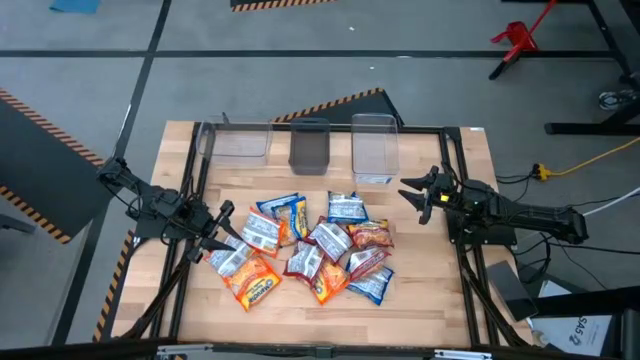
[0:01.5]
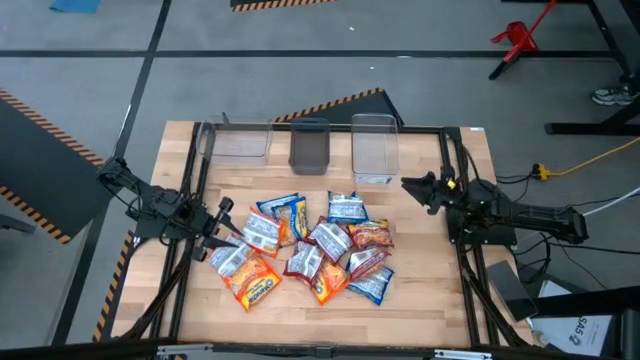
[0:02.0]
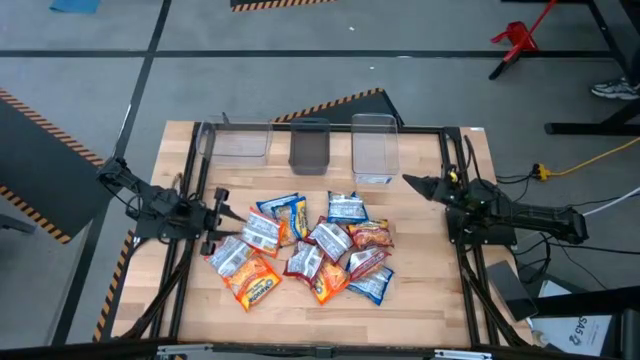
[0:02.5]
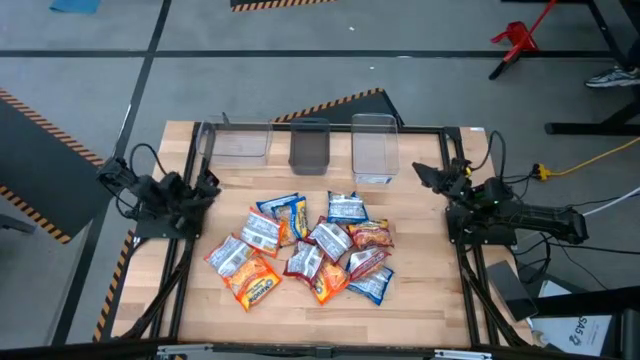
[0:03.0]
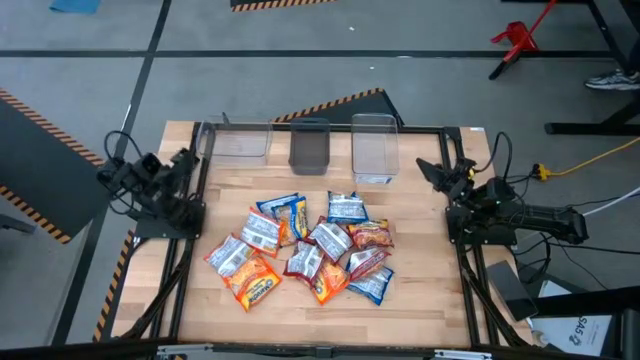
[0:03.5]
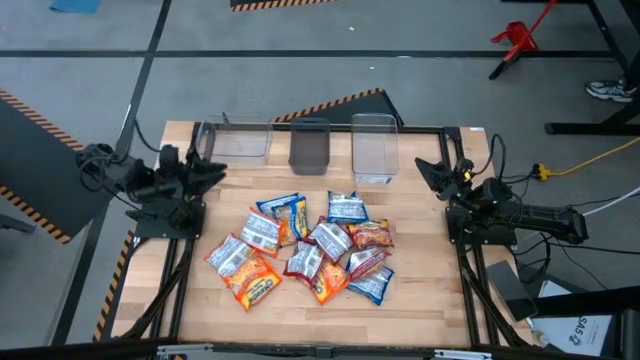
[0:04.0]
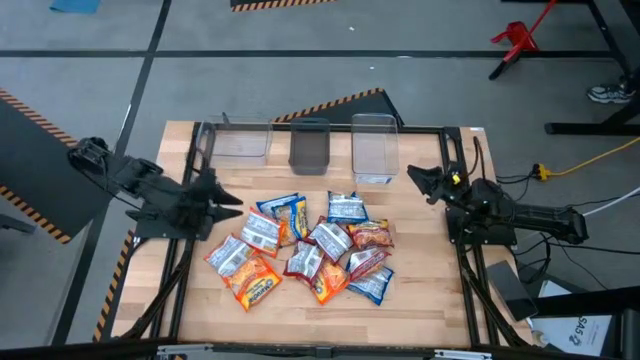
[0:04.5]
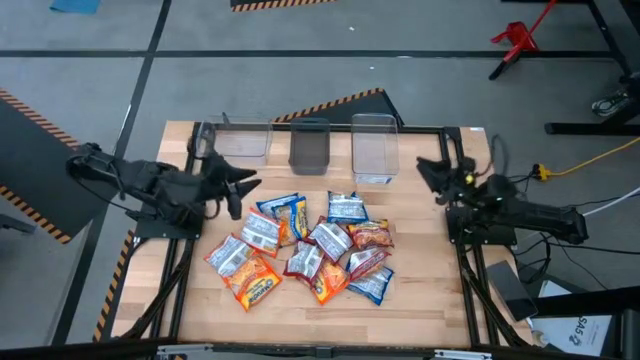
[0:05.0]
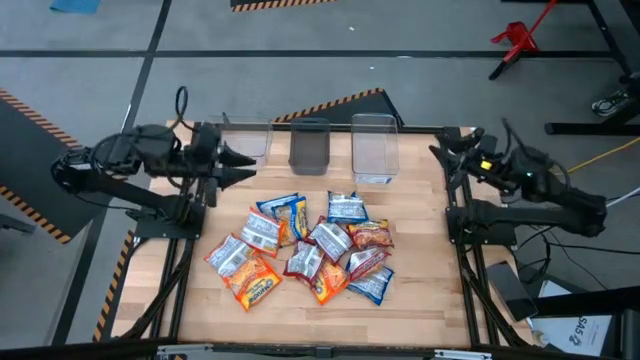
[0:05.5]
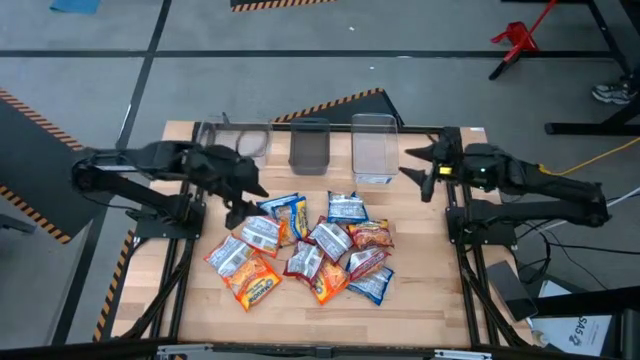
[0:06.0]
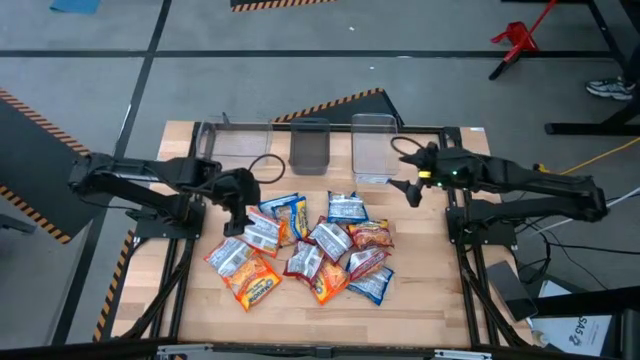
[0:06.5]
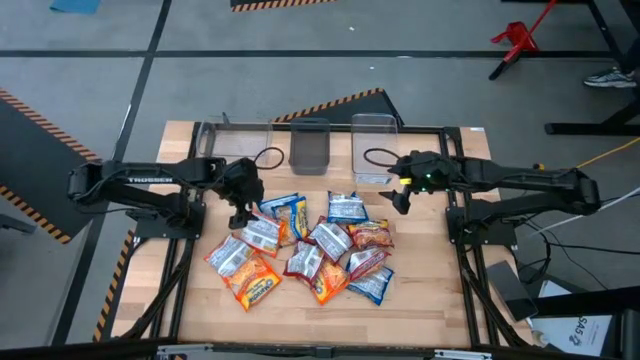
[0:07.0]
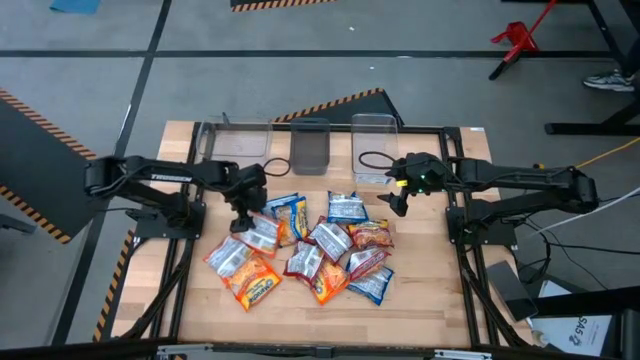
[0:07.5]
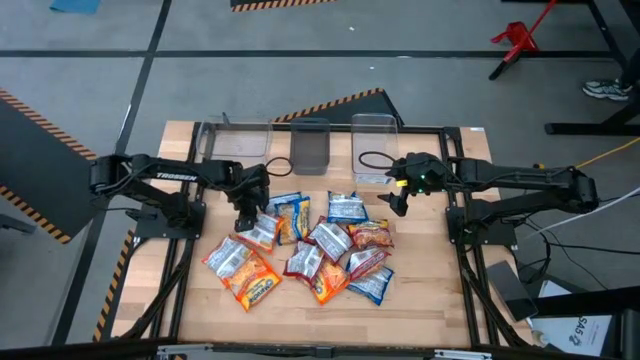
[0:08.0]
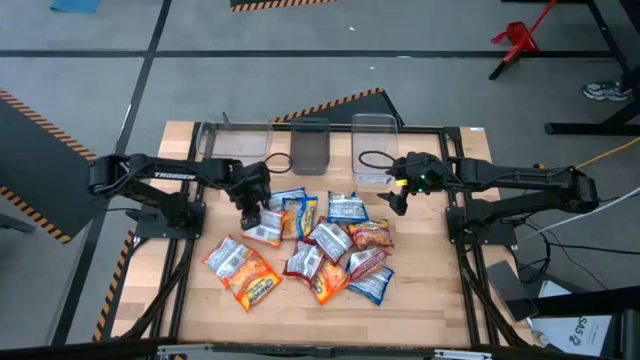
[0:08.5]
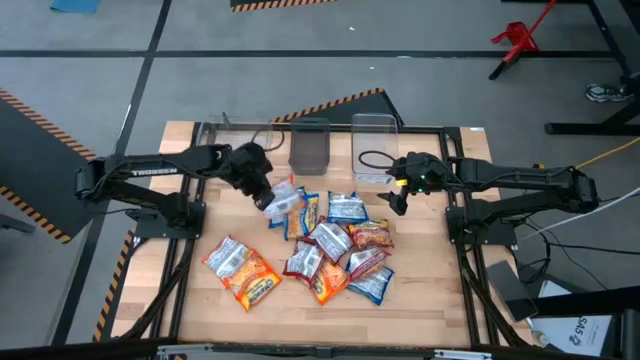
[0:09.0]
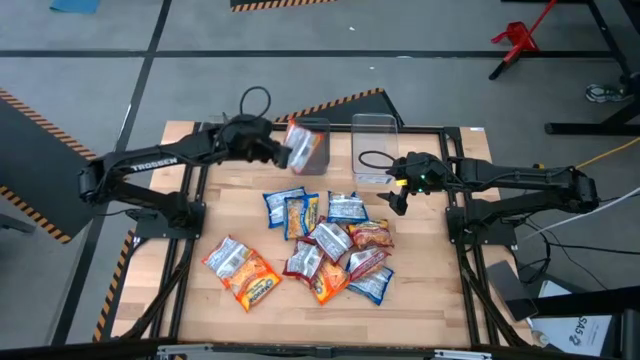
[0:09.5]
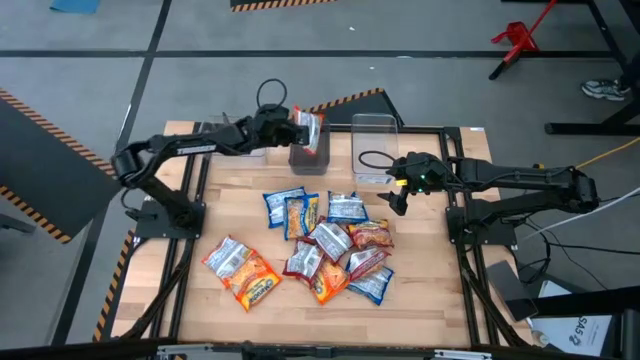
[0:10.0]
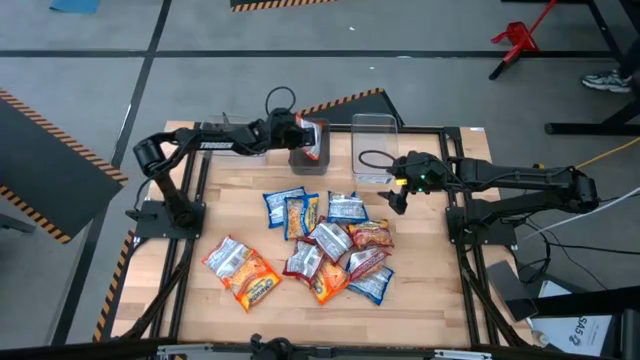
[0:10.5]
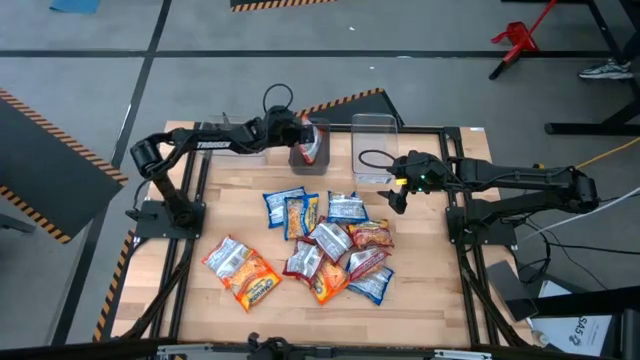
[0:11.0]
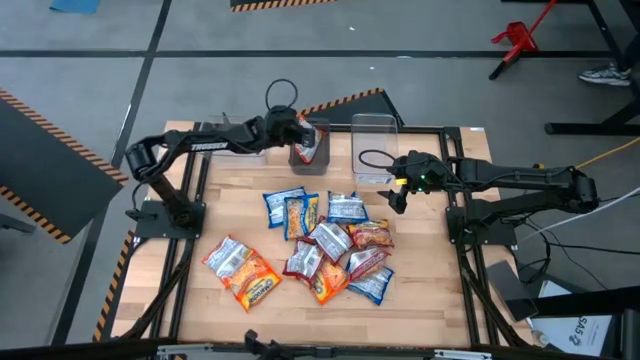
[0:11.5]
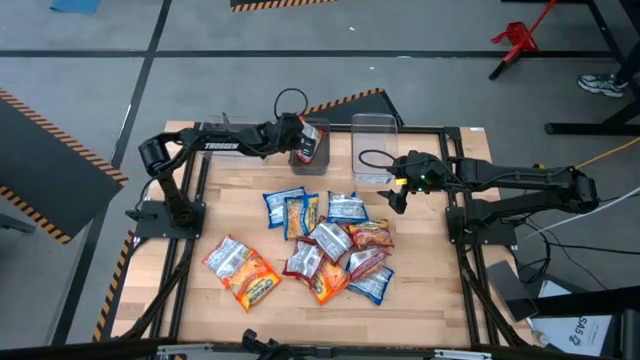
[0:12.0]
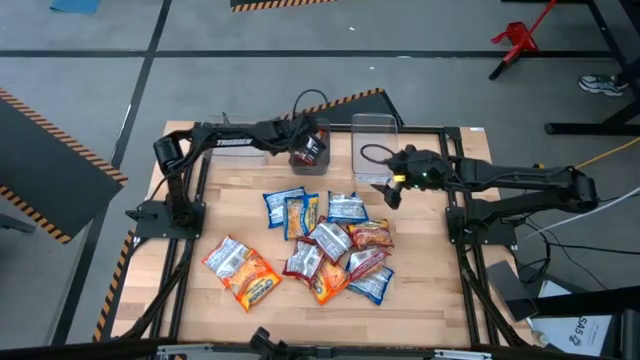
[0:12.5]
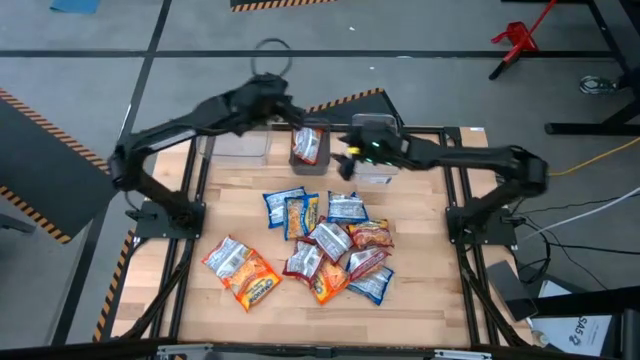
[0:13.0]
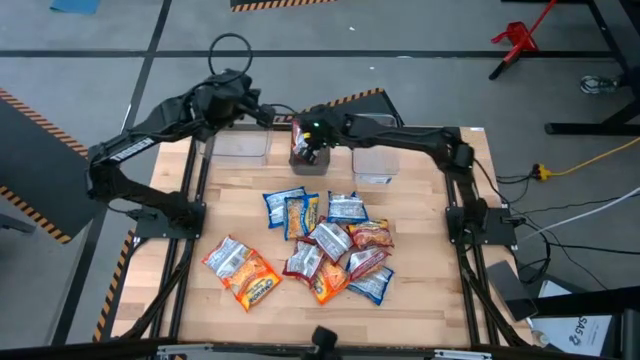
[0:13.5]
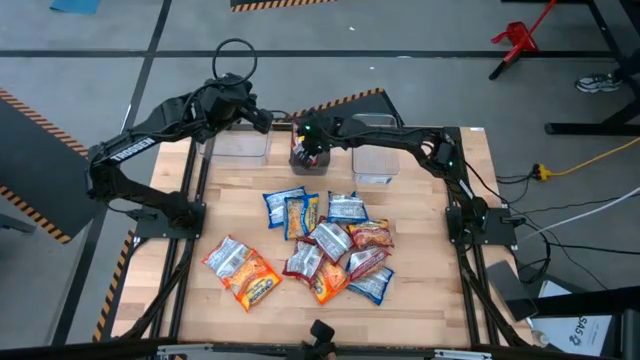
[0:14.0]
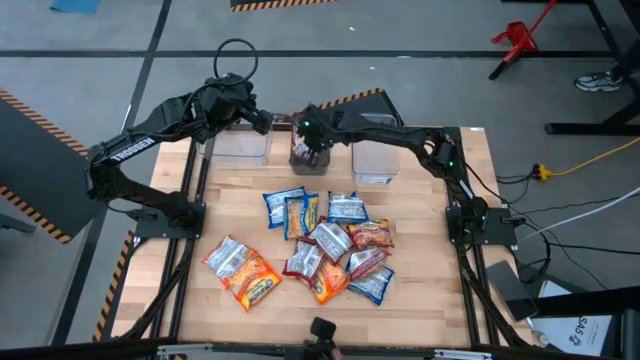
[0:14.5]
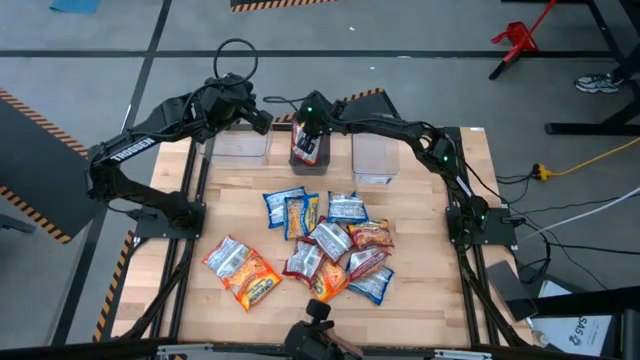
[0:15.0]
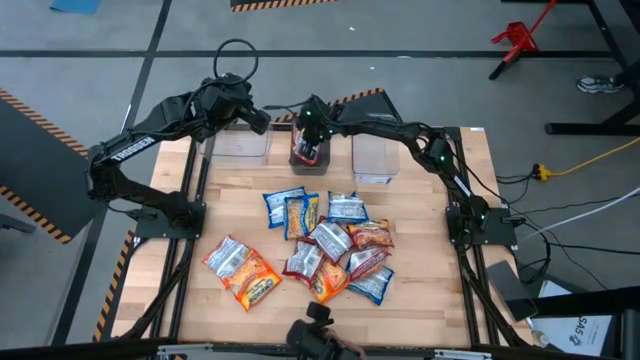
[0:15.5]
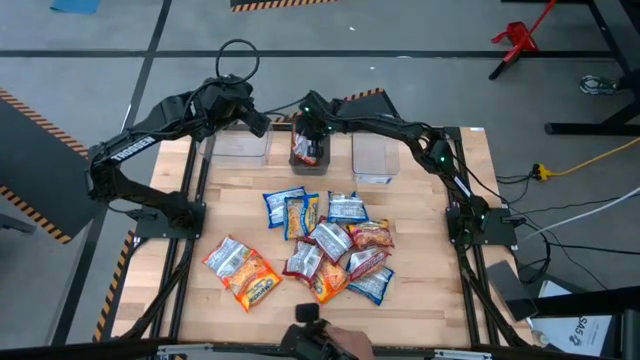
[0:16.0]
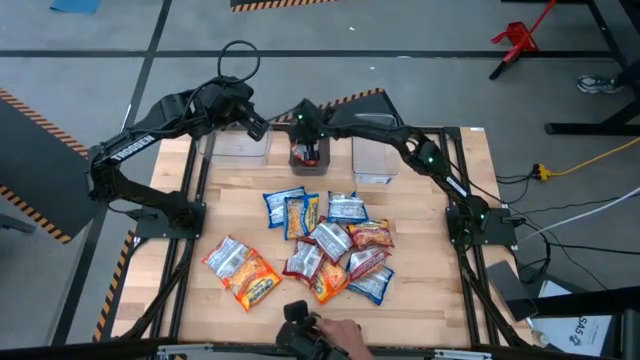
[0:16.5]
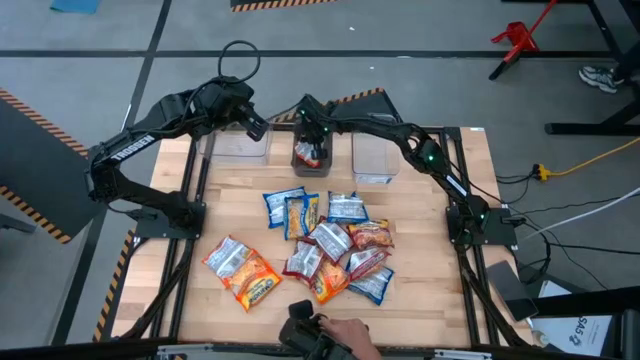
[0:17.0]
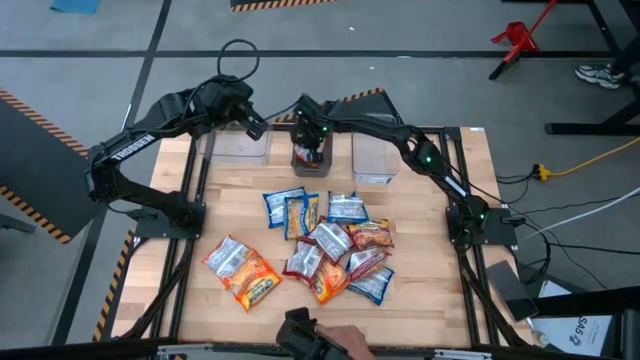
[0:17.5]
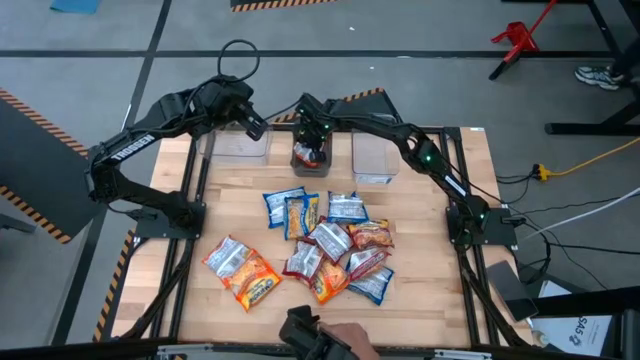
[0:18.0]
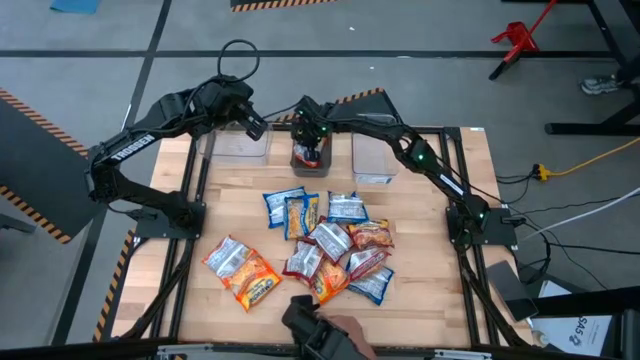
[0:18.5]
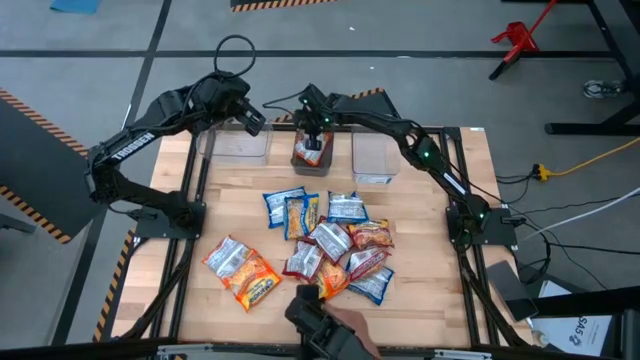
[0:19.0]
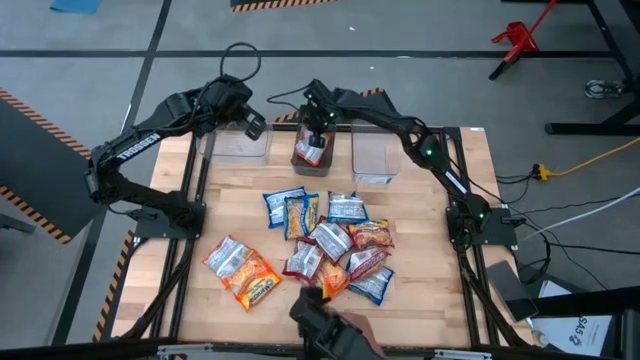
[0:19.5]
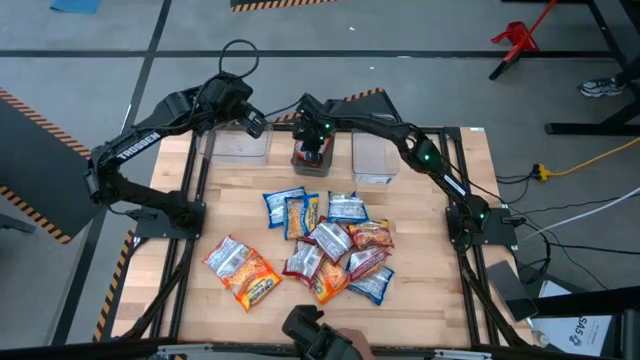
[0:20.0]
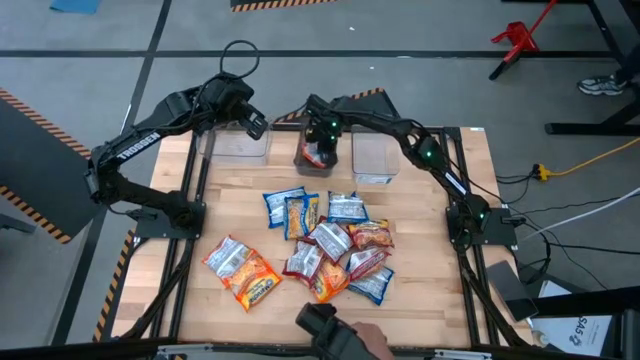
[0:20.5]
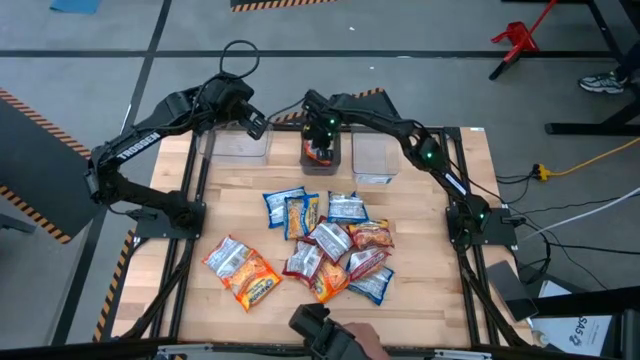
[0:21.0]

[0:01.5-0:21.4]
Task: Sort Maruchan noodles
Put the orange noodle pack into the black bin
